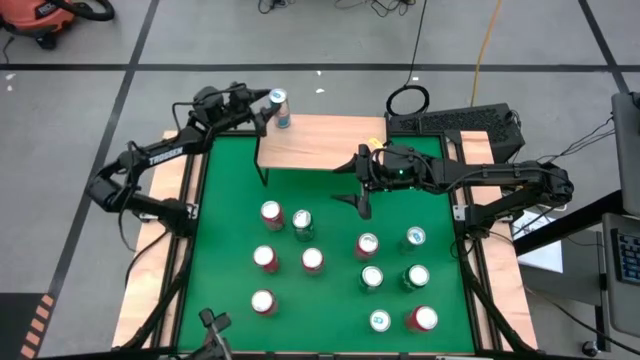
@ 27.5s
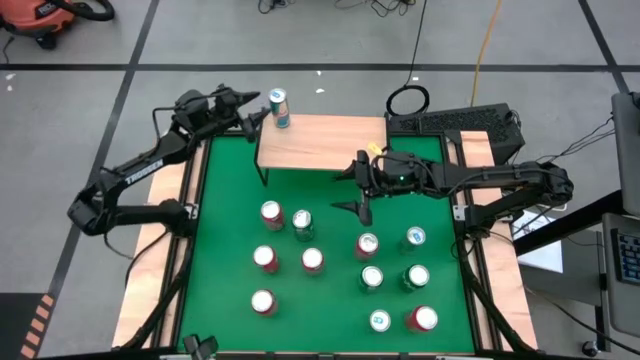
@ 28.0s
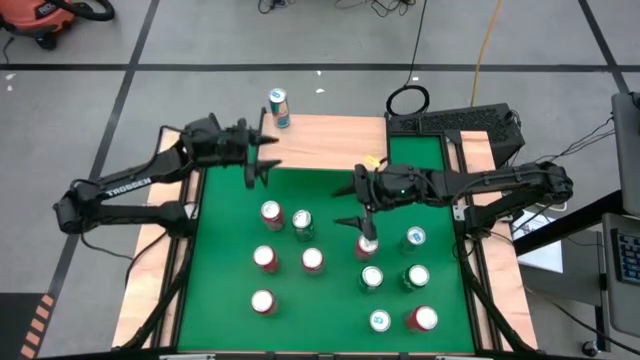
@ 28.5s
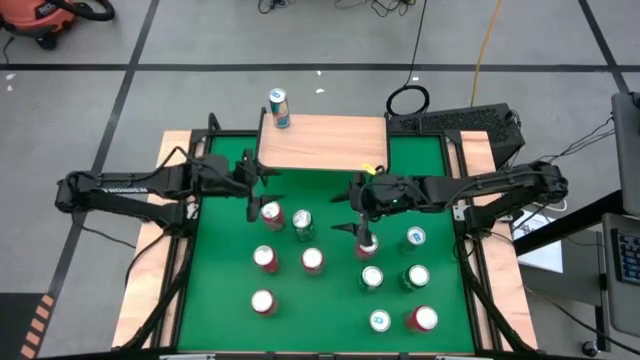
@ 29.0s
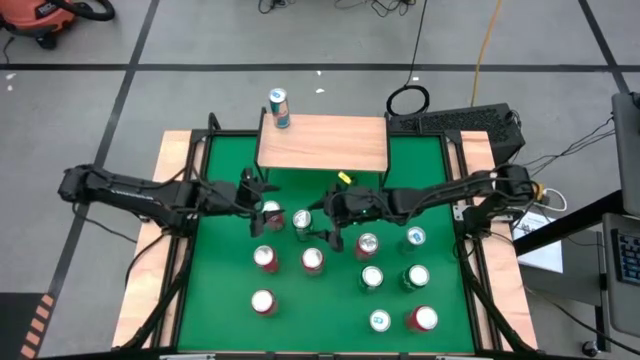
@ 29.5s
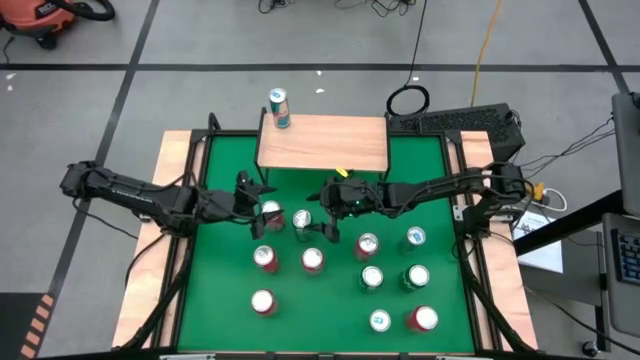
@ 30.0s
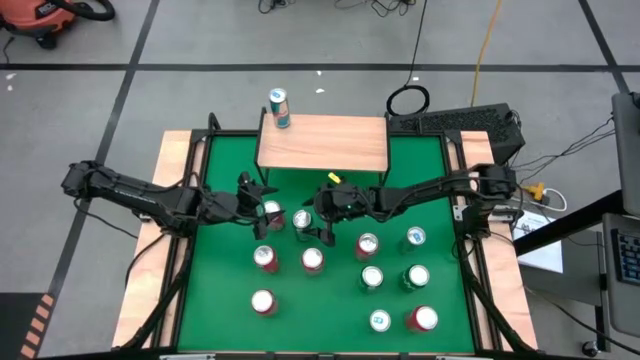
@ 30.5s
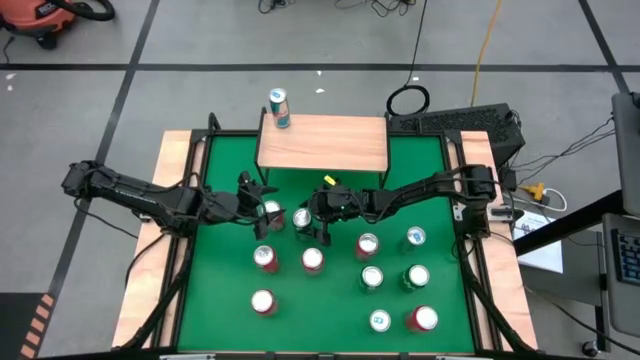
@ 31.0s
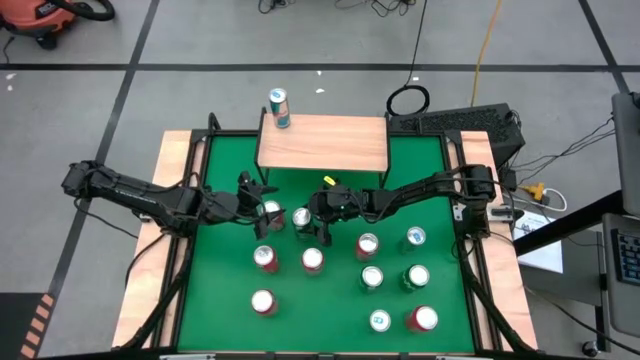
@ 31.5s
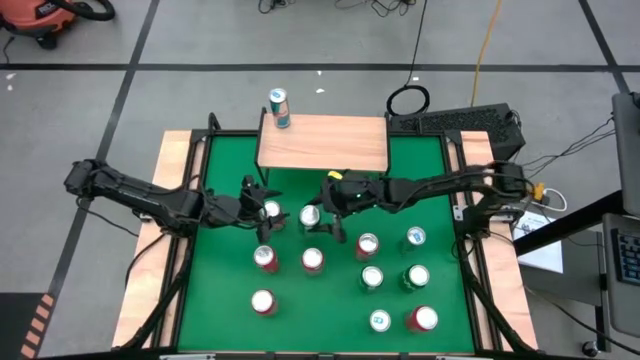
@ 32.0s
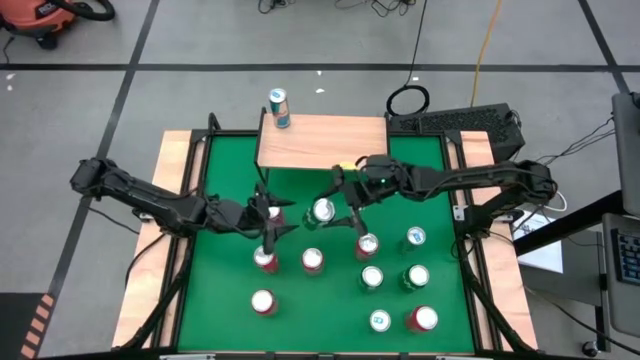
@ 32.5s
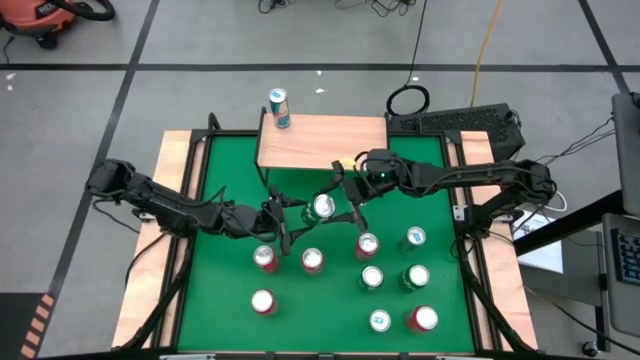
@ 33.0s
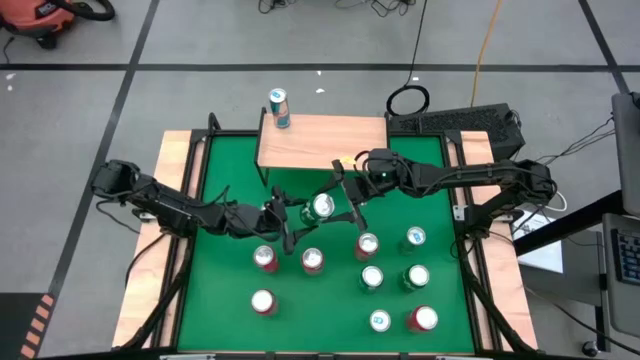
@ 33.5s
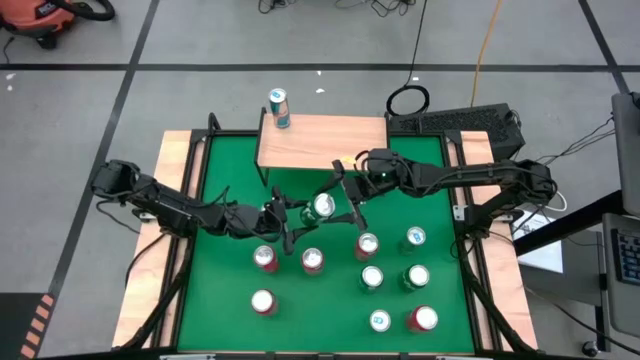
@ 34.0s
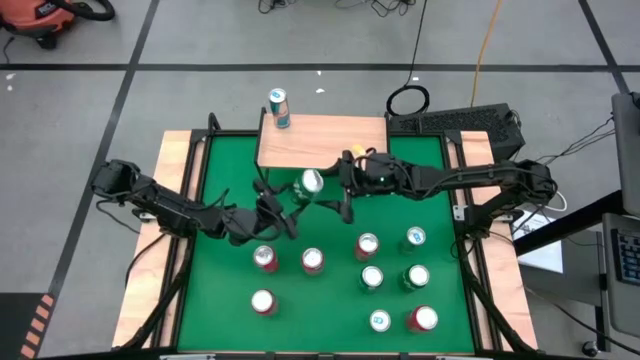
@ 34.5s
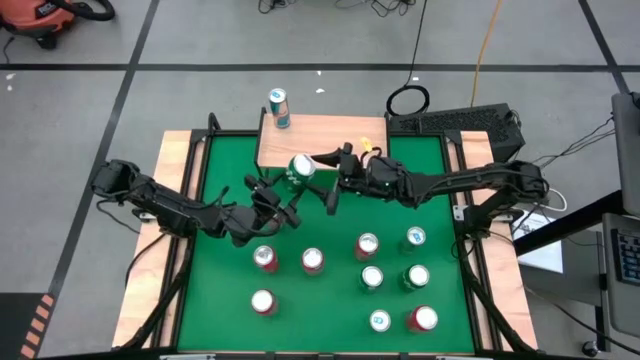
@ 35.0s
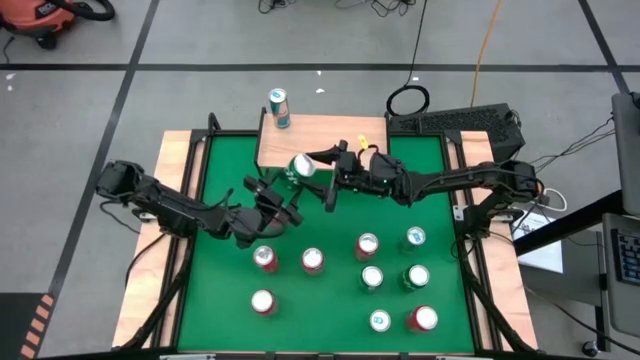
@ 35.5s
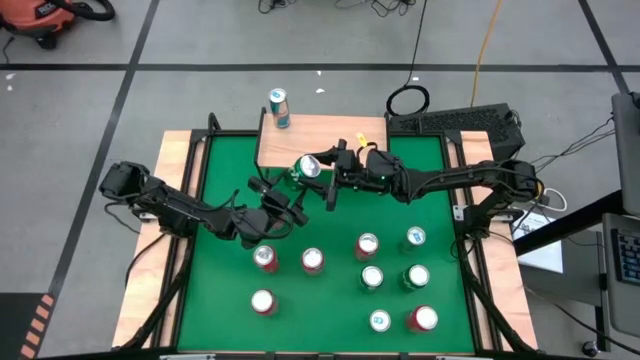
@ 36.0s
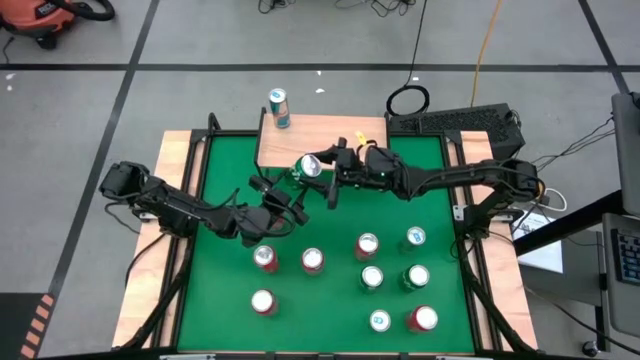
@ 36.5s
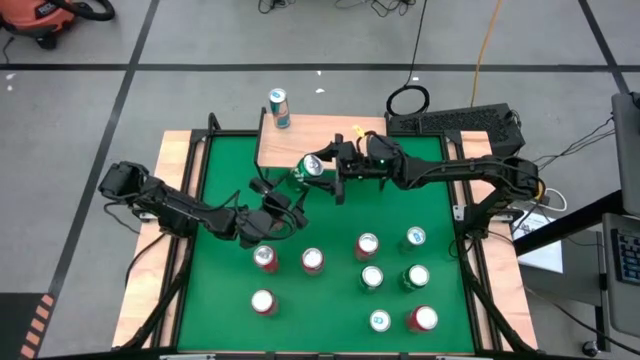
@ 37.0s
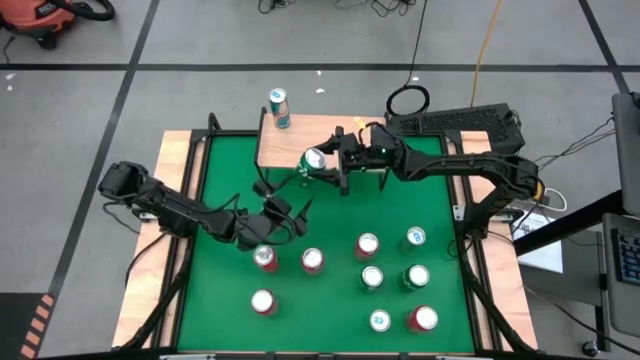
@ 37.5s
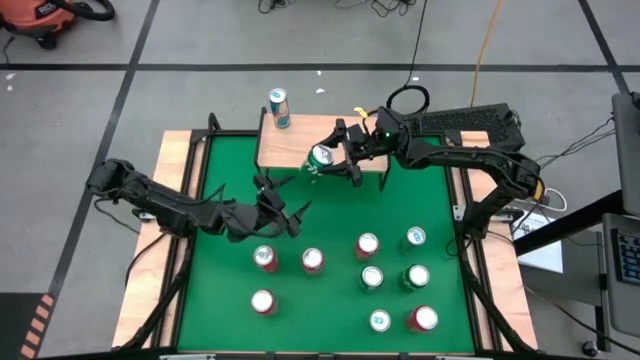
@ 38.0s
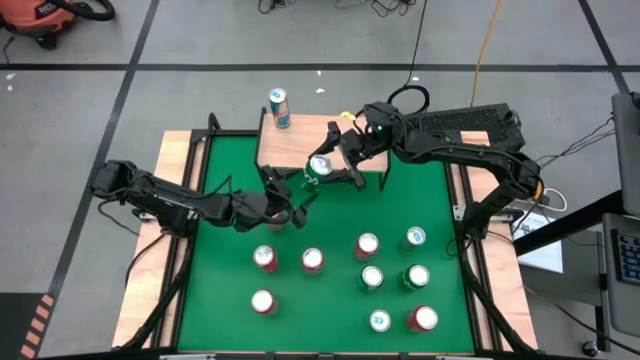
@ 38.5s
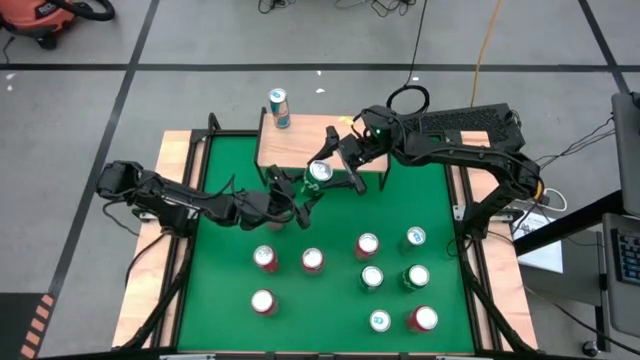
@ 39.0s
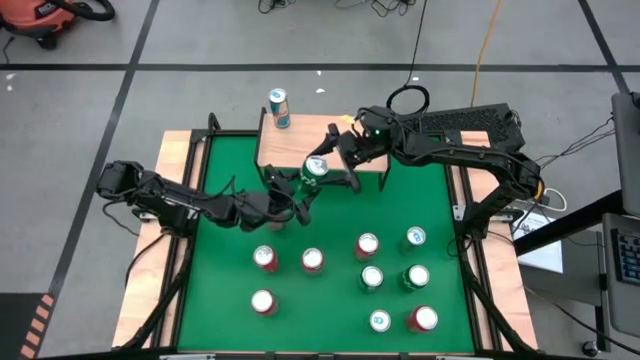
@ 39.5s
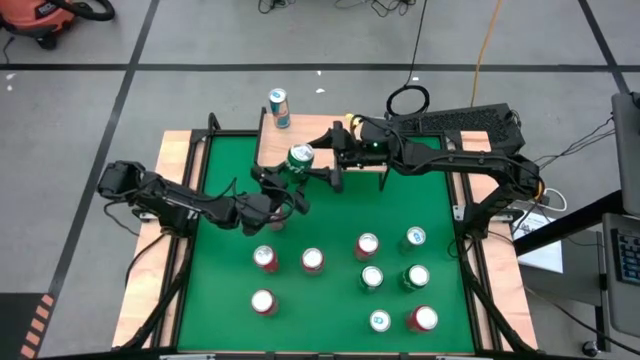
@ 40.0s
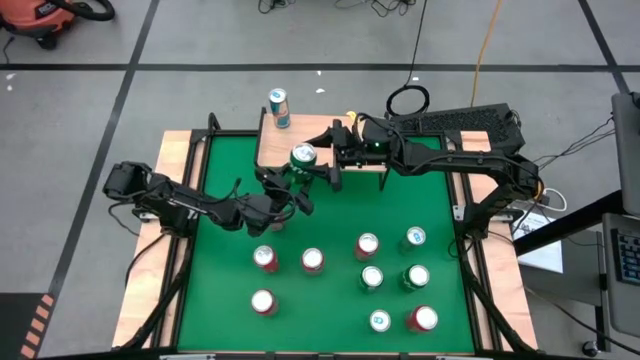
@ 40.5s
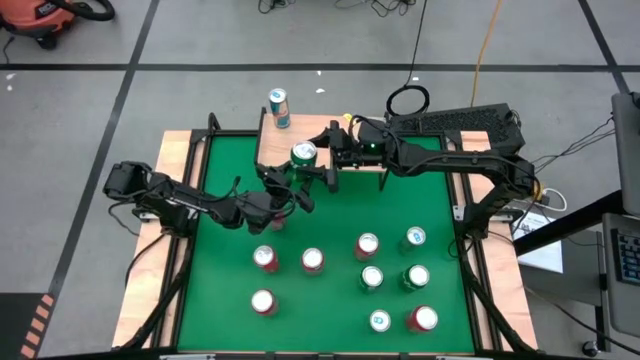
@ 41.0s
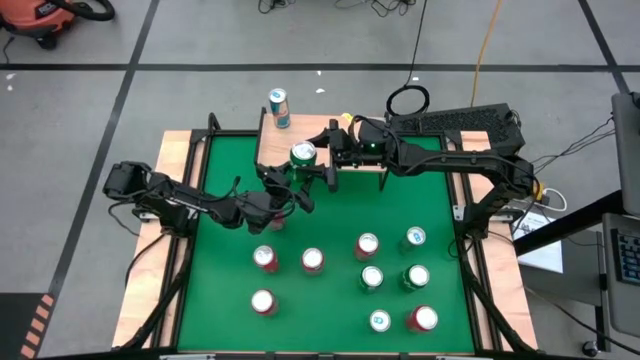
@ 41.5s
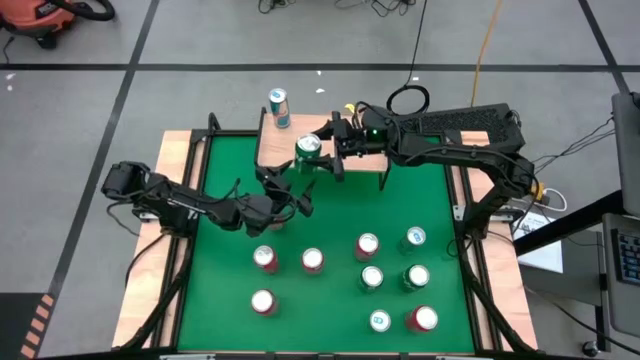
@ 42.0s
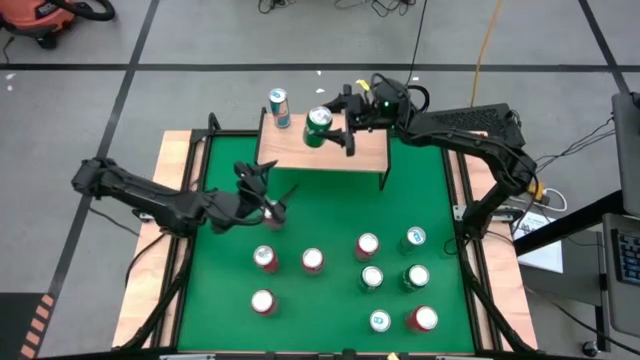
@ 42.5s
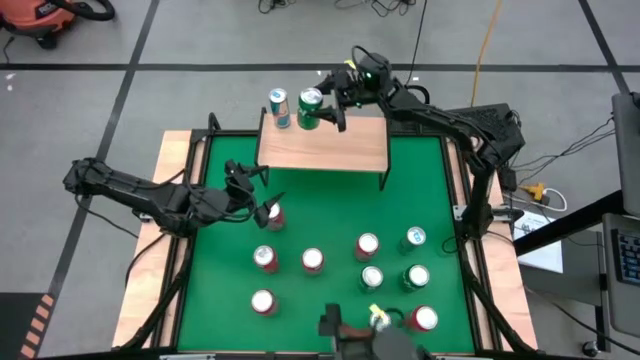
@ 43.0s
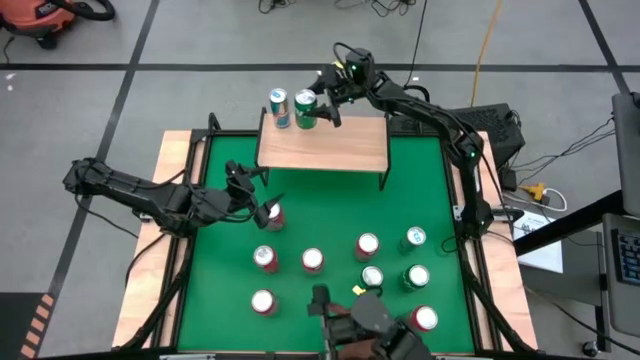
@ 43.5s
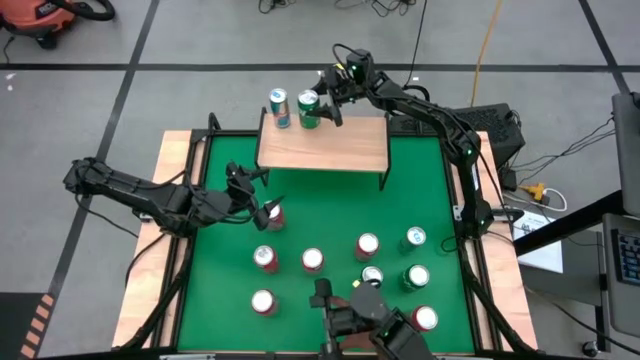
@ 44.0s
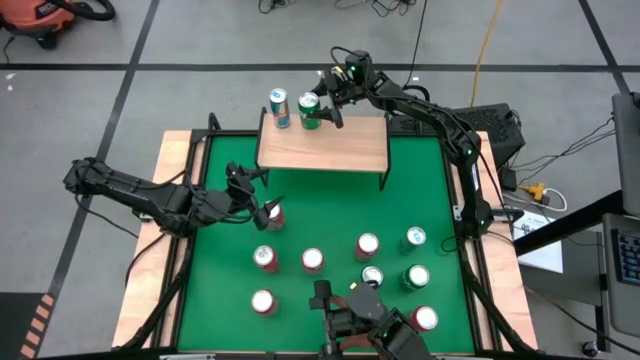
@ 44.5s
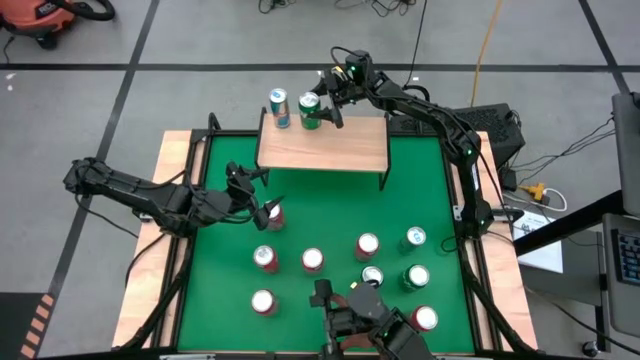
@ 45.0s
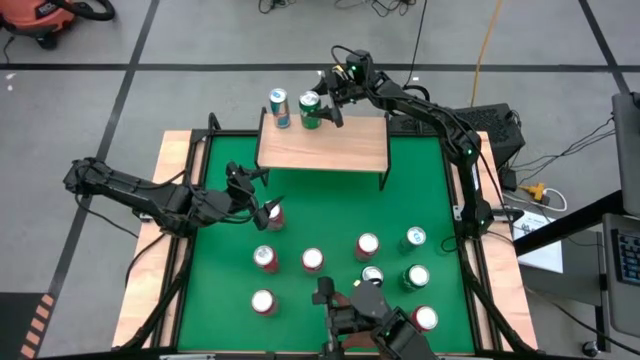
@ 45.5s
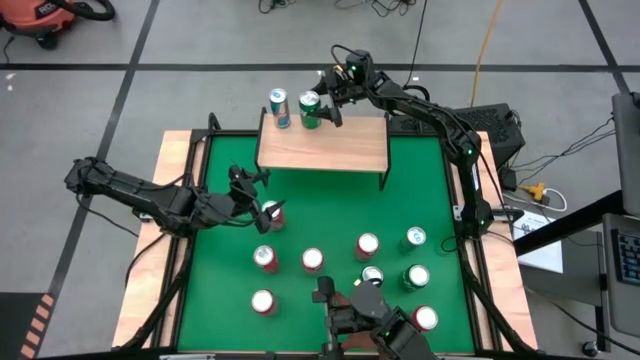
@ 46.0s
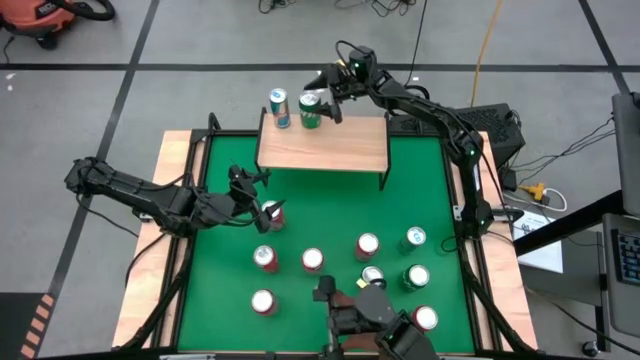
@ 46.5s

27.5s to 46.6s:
Task: Place canned beverage on shelf
Put the green soda can on the shelf

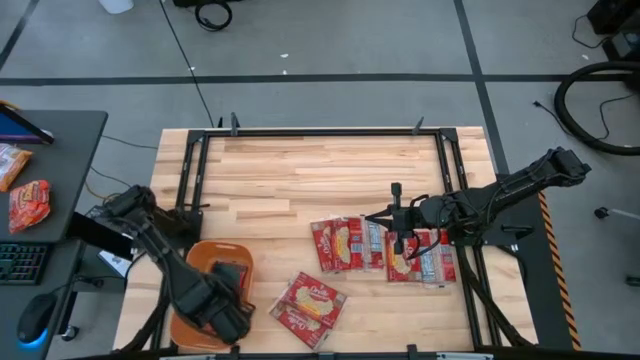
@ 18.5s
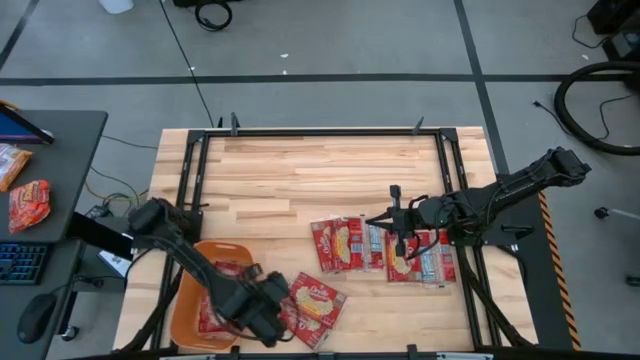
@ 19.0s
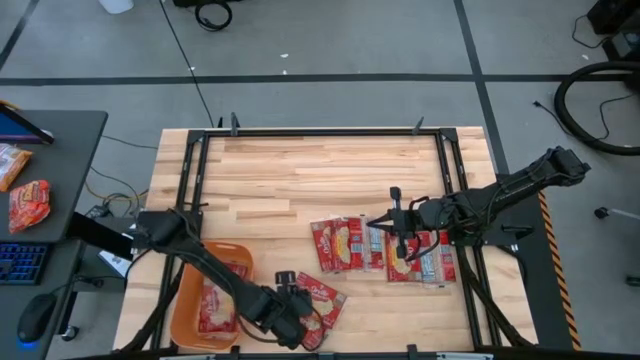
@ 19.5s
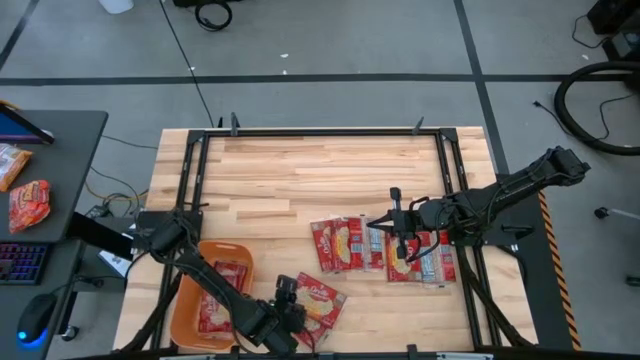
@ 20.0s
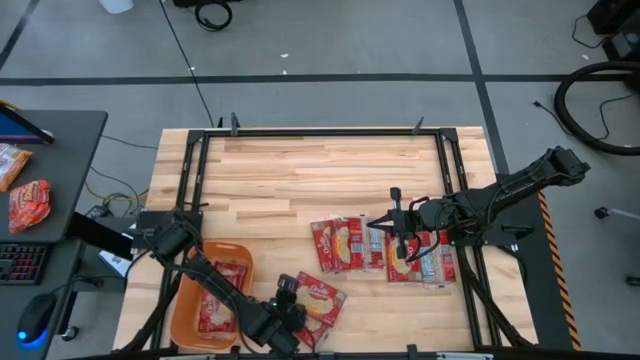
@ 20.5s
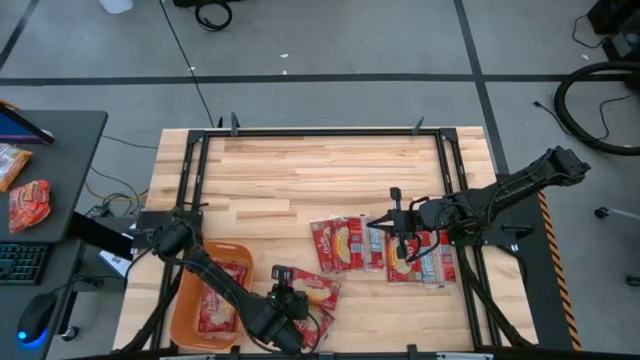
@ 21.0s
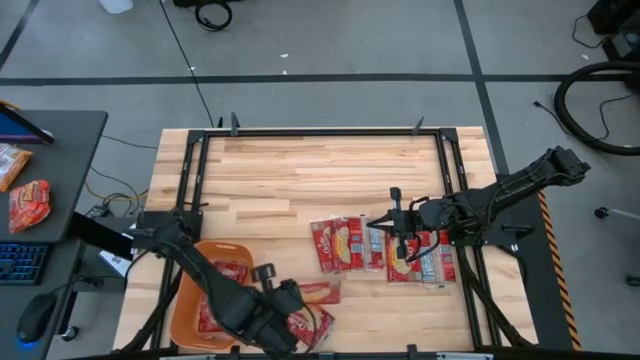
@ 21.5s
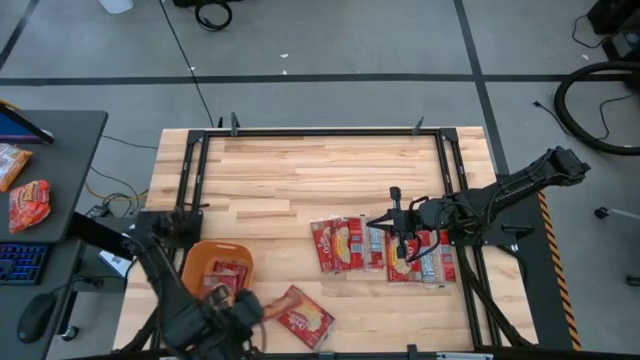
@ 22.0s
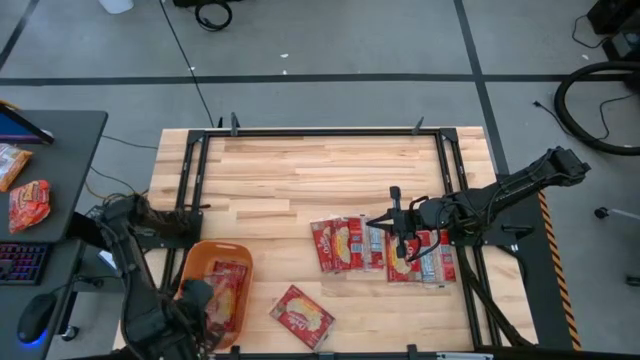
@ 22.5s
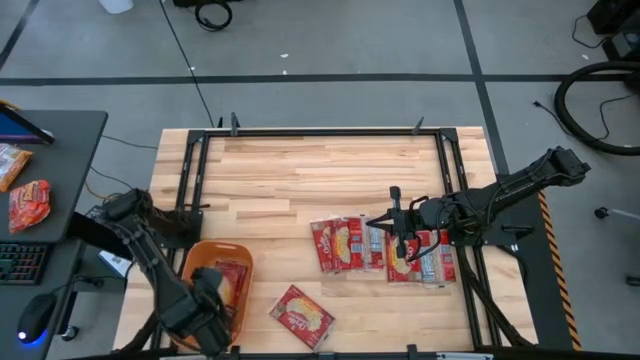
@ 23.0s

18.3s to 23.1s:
Task: Sort popcorn bags into baskets
Put the popcorn bag into the orange bin
